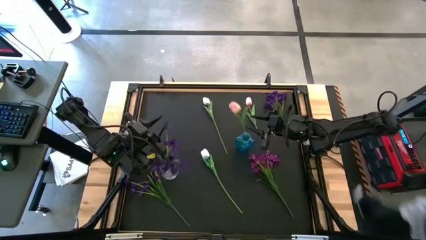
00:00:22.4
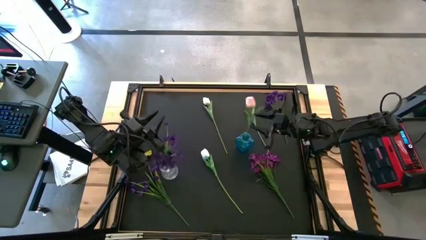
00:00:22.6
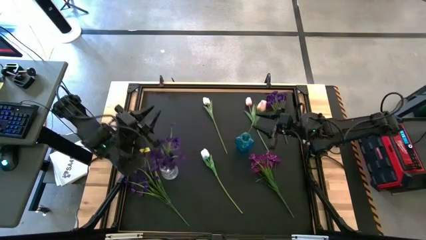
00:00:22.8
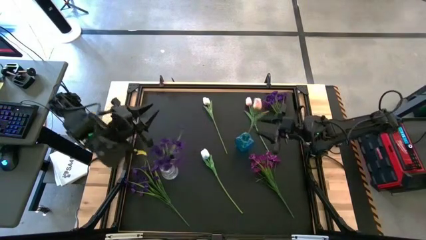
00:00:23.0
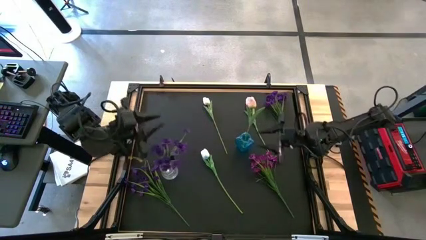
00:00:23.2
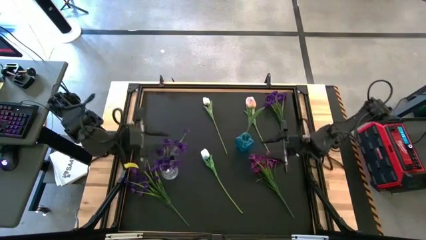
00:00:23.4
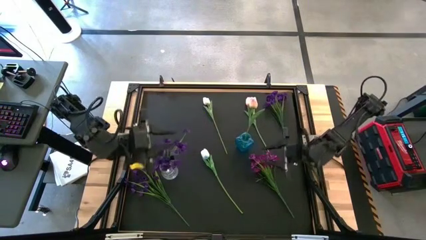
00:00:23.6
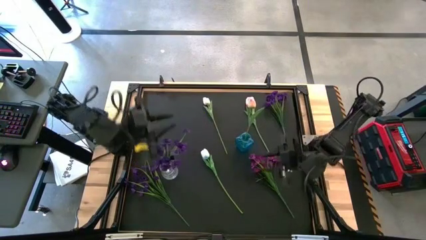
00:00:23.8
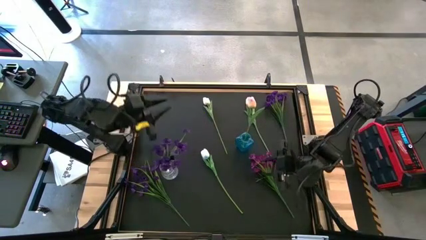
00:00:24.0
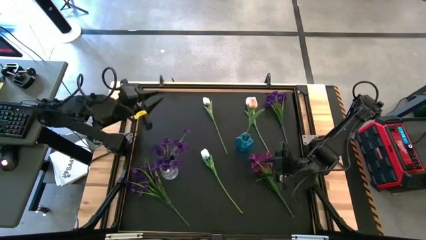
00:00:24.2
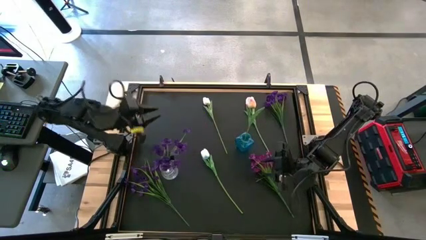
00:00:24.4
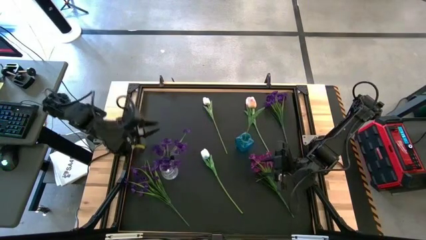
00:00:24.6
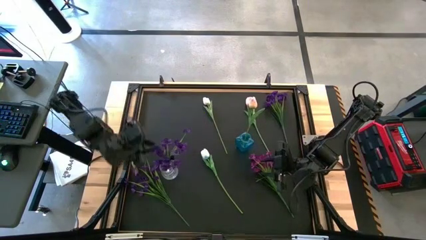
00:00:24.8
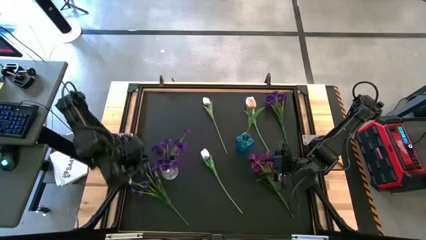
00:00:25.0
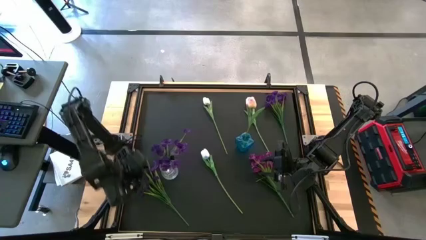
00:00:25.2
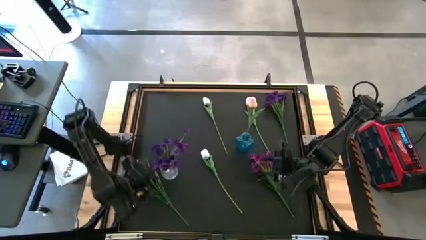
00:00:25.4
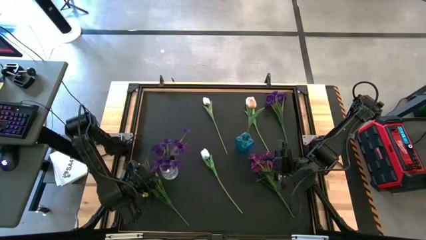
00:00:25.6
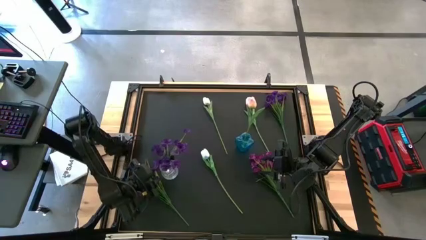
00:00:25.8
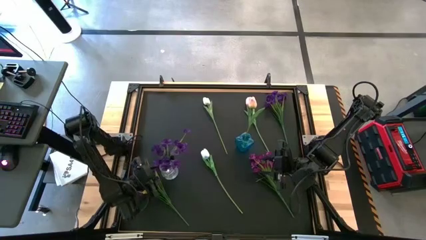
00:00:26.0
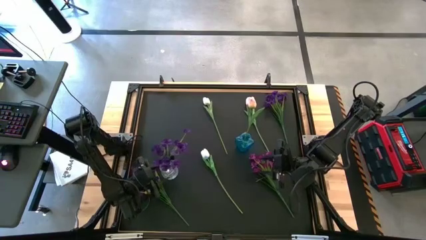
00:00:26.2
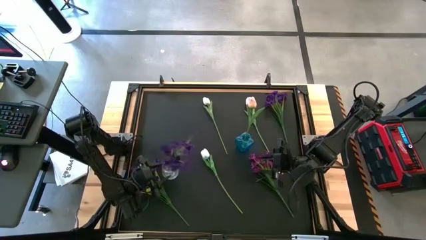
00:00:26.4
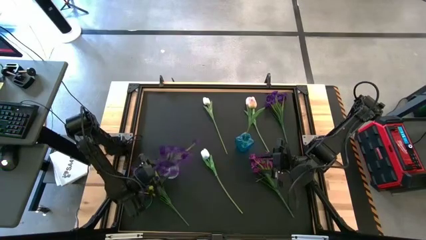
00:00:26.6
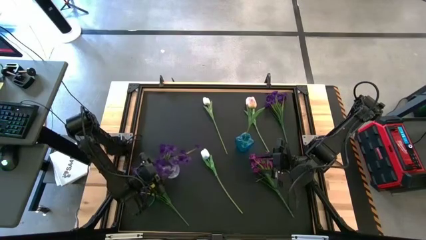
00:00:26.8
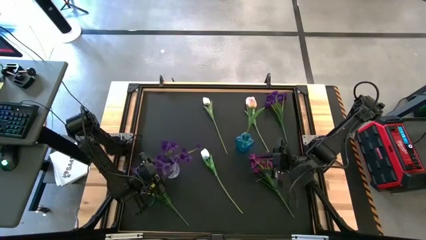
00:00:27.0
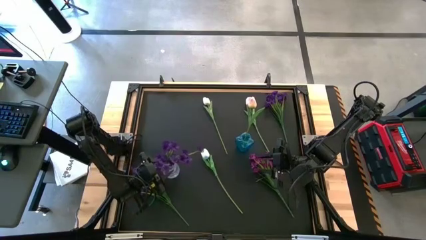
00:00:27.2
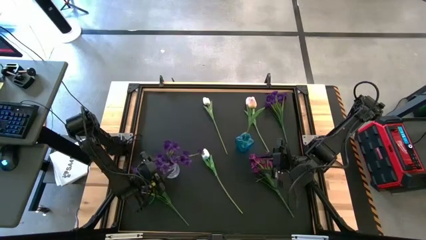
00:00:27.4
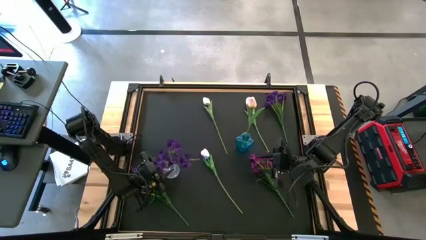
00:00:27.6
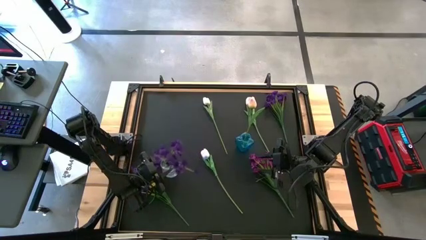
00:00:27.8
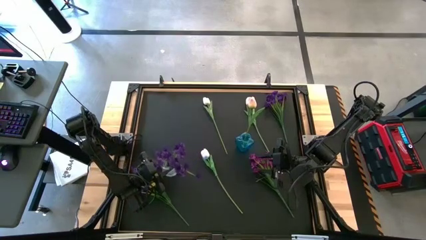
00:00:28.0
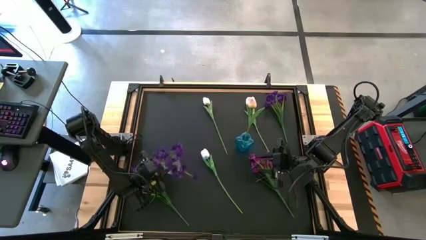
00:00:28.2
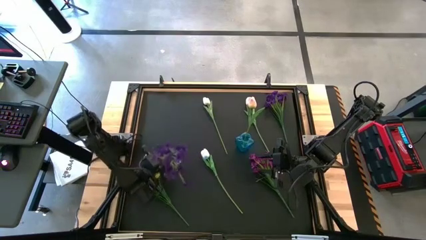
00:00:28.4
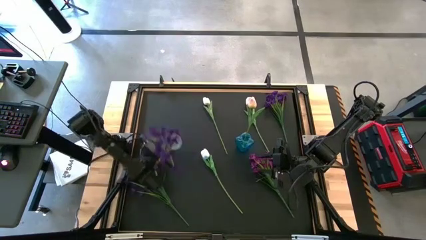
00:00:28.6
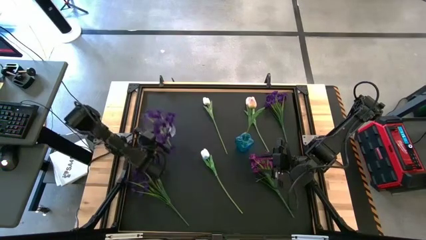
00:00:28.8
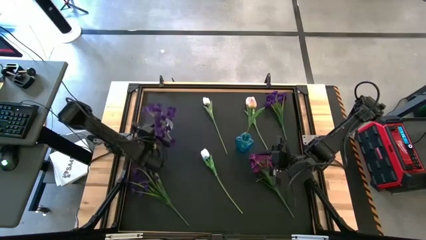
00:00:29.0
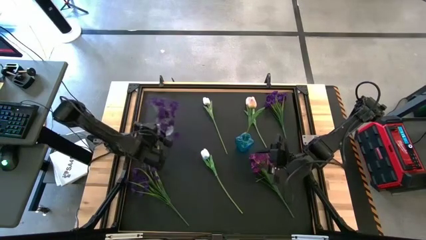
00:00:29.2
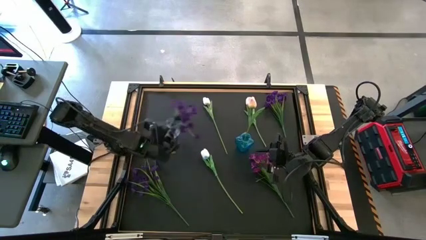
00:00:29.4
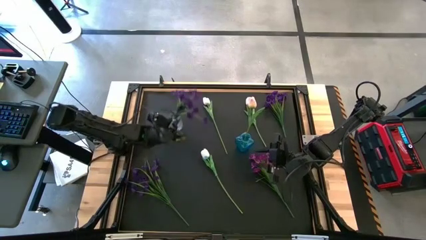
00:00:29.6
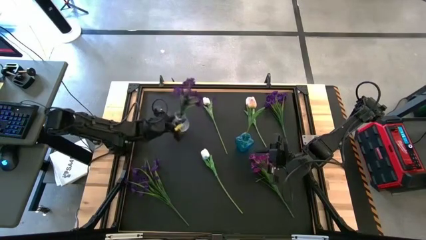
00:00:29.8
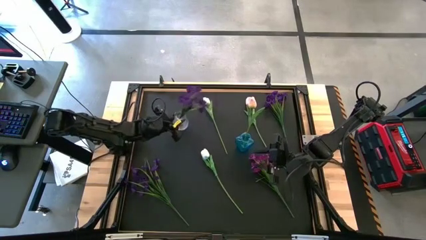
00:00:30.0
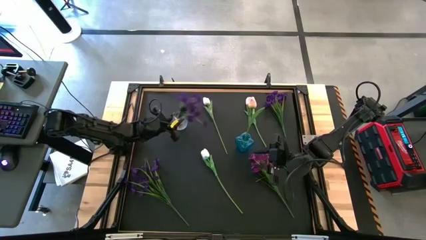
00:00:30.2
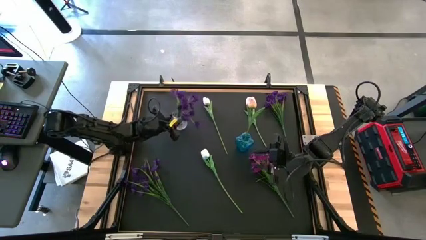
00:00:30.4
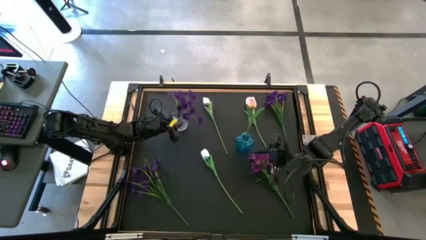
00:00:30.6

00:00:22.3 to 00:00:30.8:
Task: Sort flowers into vase by color
Move the transparent flower vase to the top left of the table

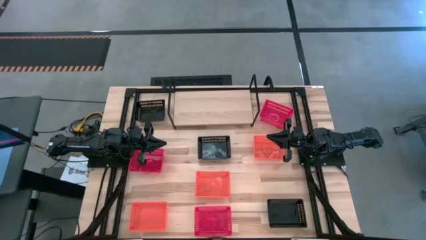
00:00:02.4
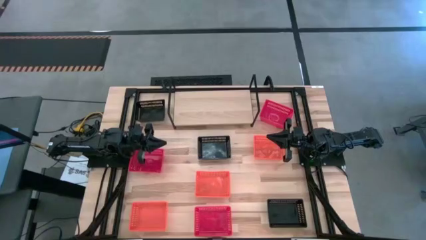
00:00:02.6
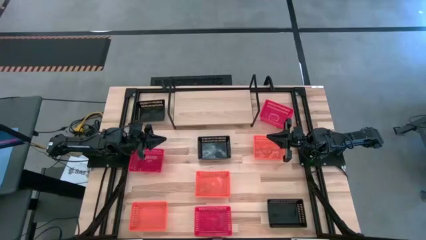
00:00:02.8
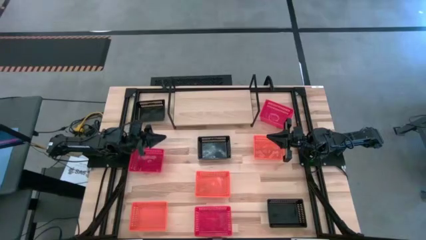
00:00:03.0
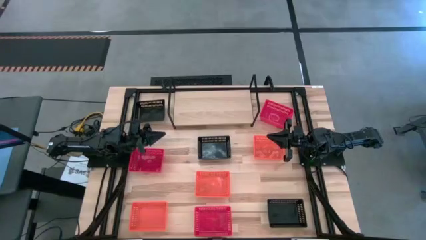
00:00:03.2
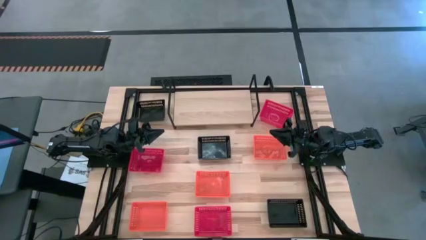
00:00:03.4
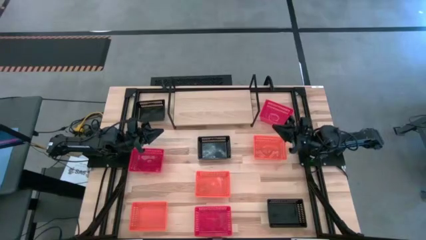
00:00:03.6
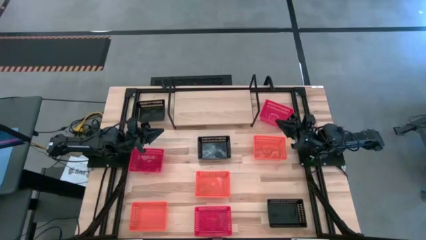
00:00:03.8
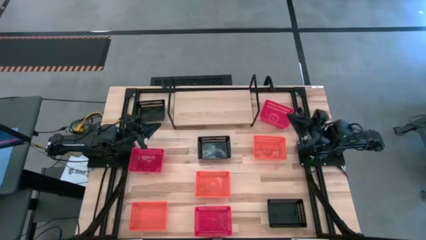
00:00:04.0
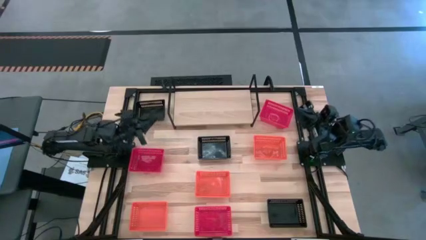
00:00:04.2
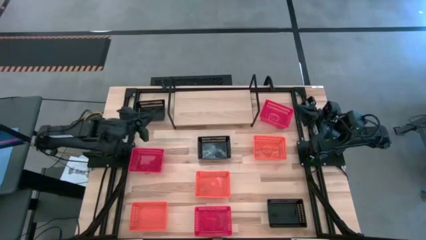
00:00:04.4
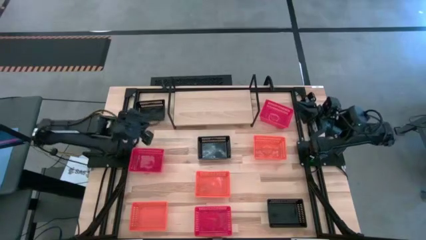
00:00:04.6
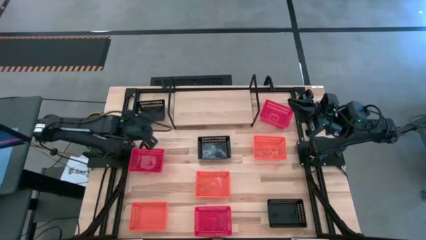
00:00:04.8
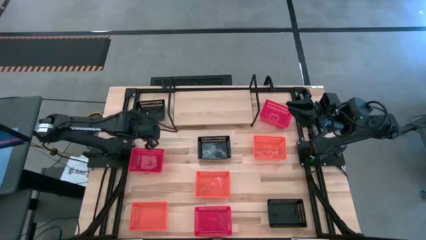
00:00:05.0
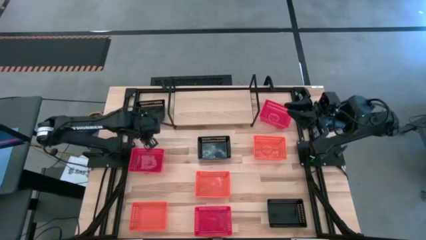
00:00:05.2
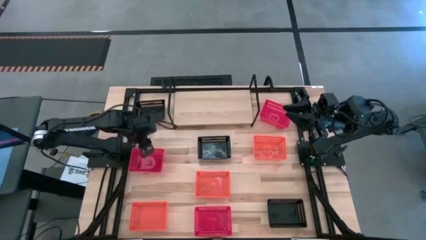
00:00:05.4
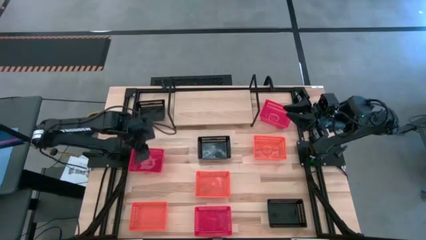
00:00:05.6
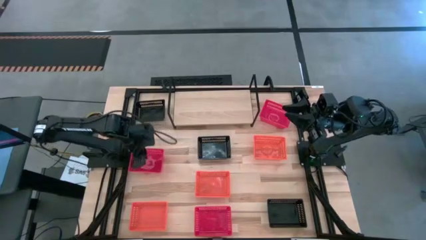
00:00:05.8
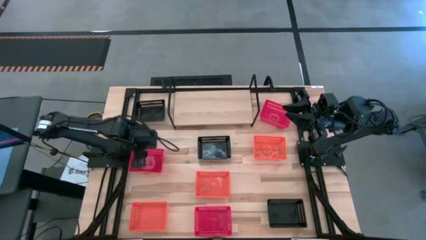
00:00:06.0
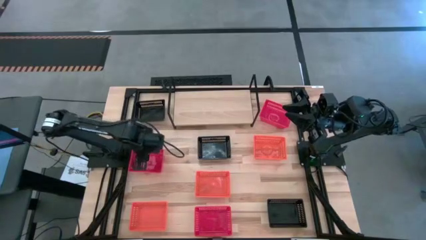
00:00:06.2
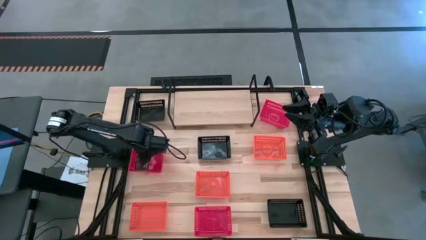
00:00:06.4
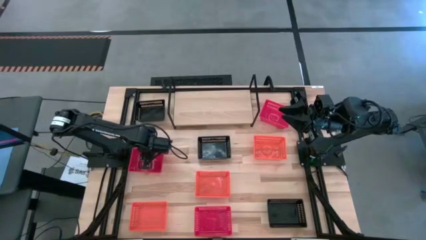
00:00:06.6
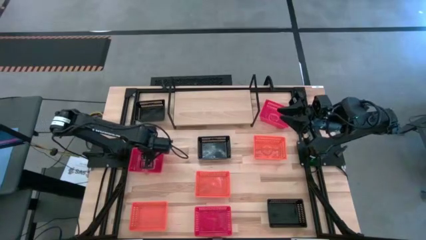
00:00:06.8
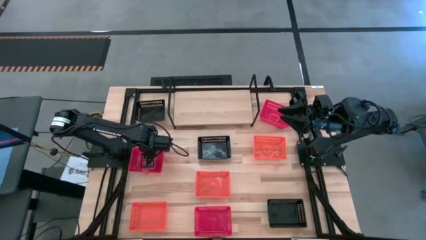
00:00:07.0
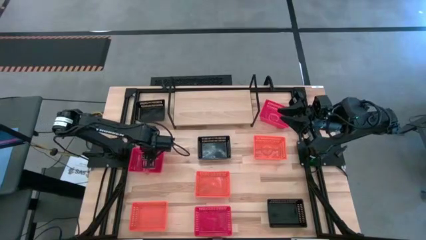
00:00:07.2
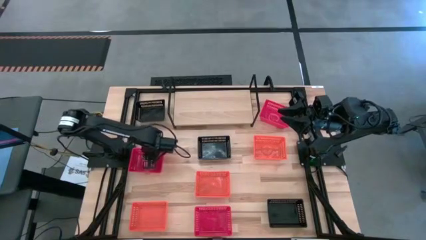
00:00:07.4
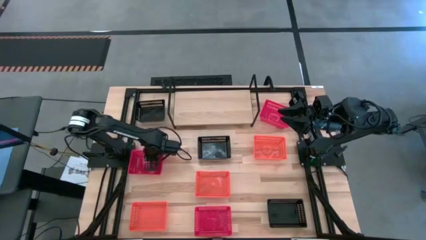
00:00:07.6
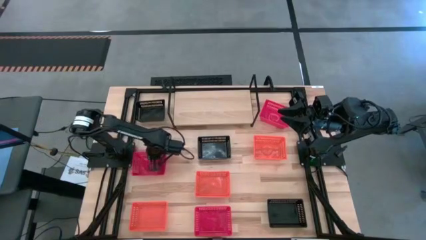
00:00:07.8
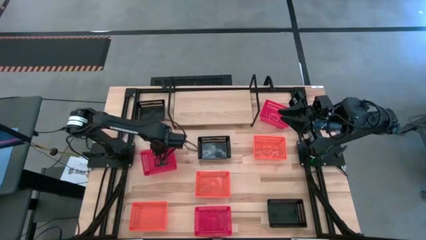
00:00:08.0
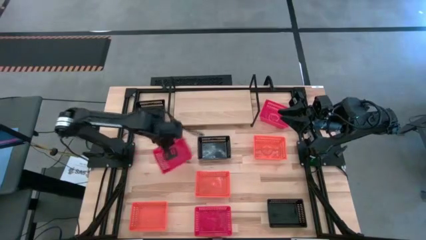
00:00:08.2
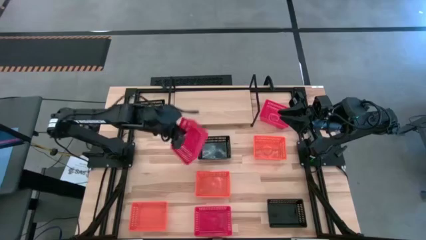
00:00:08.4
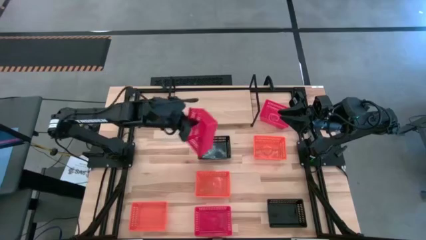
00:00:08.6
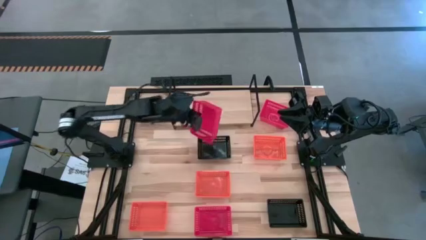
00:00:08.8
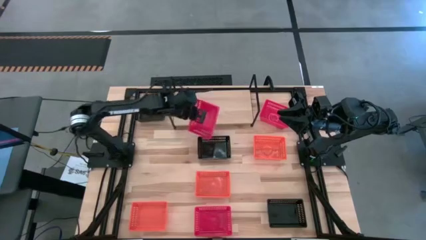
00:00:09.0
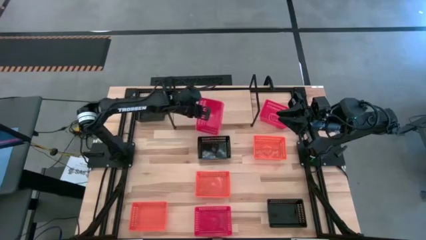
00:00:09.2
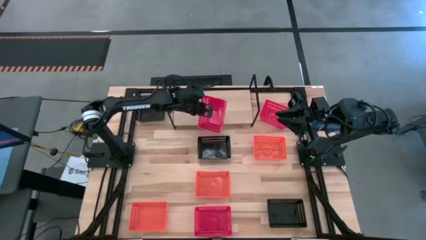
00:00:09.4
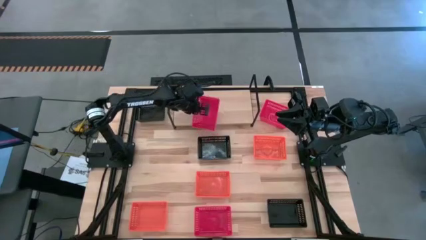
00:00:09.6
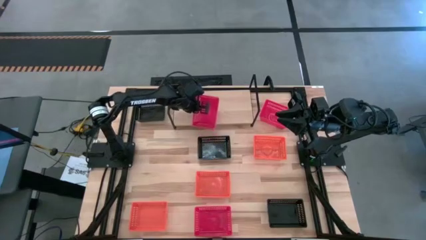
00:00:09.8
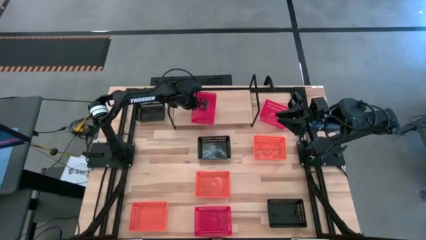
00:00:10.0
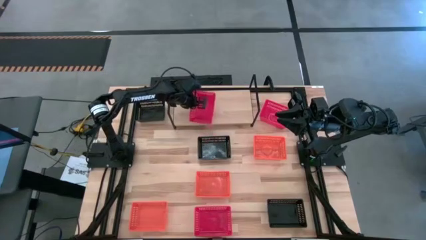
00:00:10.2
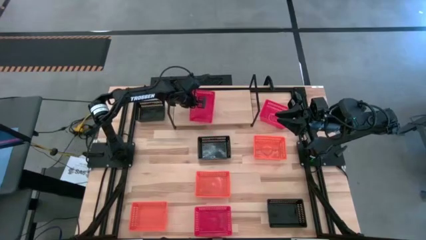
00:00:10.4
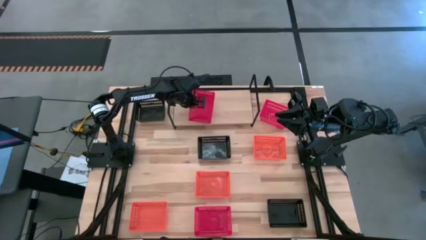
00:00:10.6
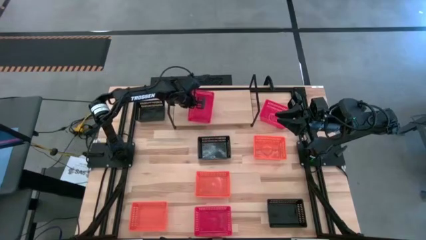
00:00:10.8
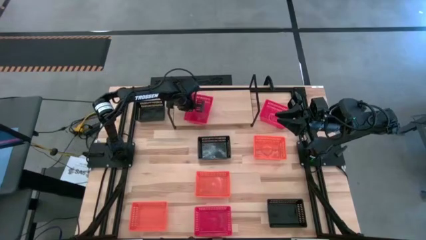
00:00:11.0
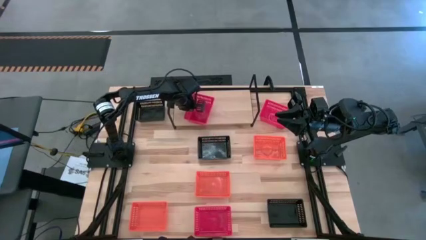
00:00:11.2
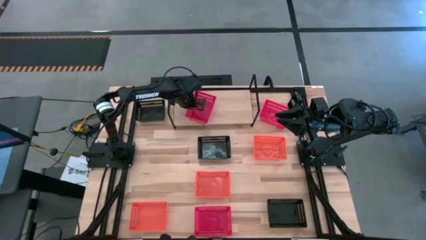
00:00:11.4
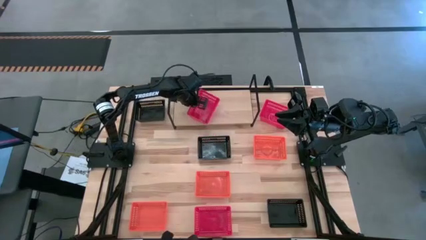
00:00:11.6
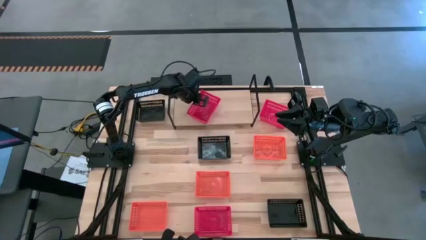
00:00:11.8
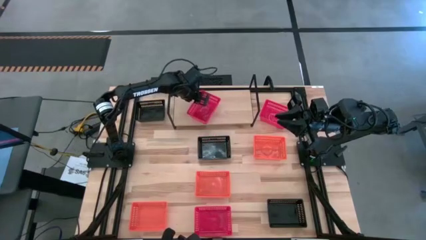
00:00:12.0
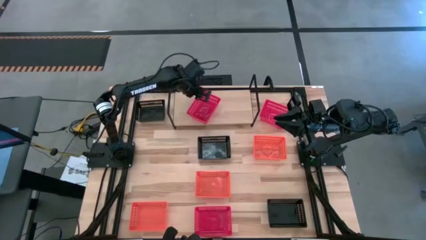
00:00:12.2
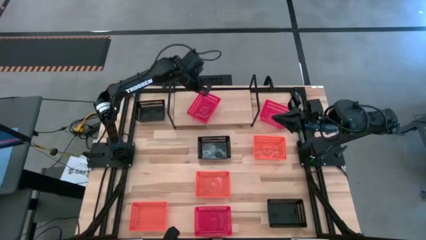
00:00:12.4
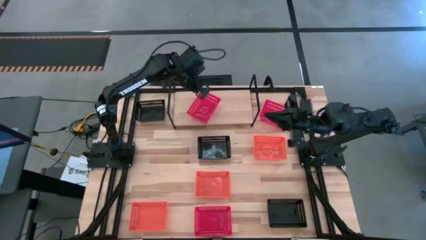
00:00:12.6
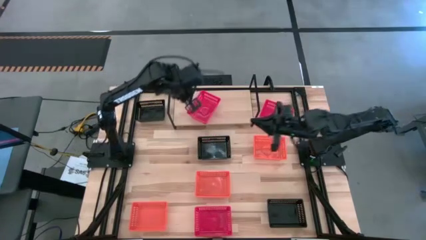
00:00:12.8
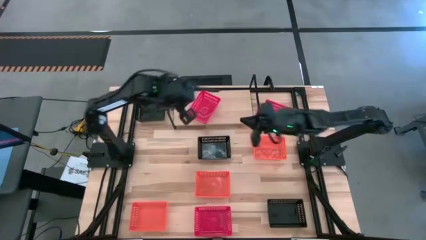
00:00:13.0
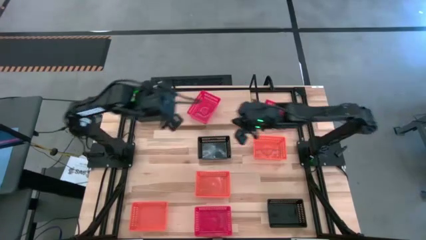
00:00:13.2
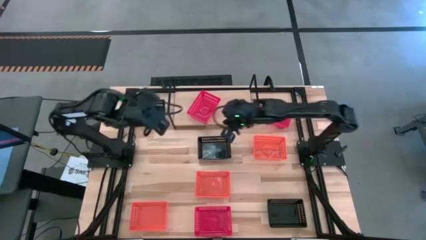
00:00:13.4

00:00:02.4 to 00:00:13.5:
Task: Stack baskets on shelf by color
Put the middle red bin on the shelf
